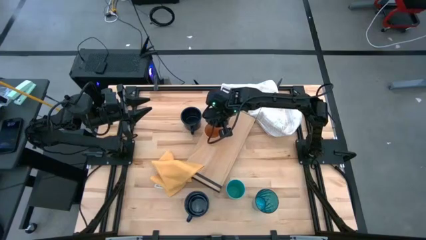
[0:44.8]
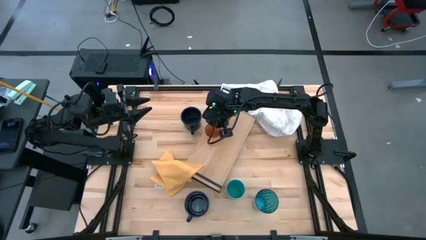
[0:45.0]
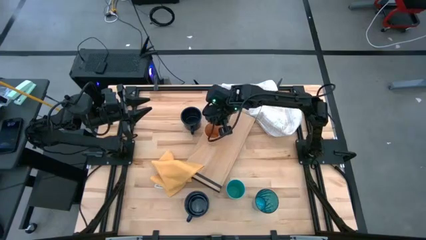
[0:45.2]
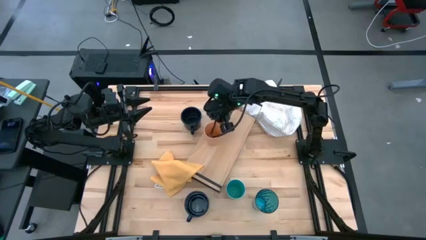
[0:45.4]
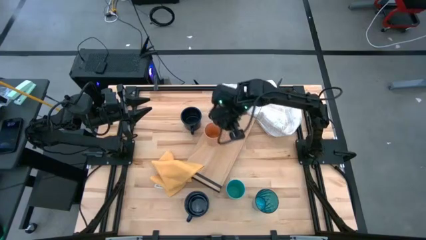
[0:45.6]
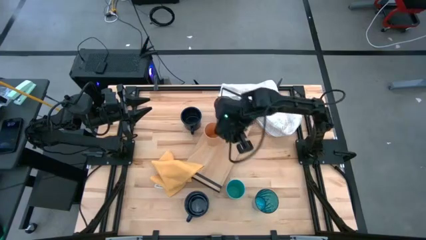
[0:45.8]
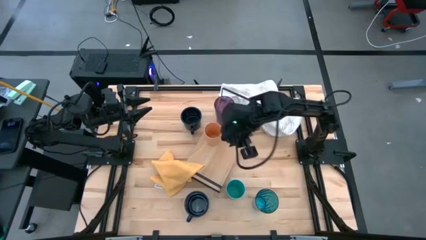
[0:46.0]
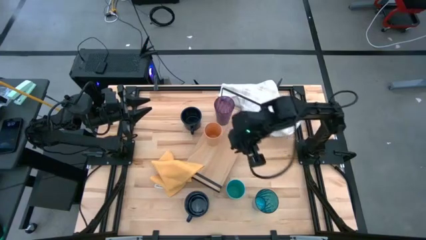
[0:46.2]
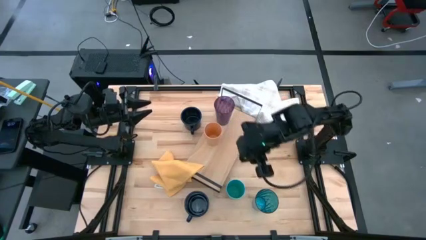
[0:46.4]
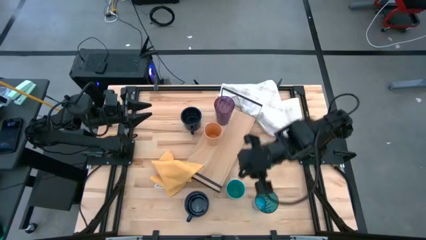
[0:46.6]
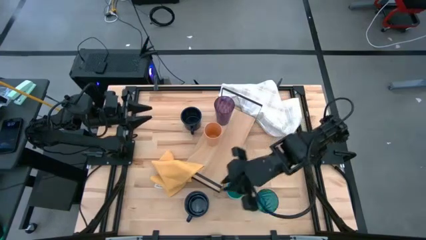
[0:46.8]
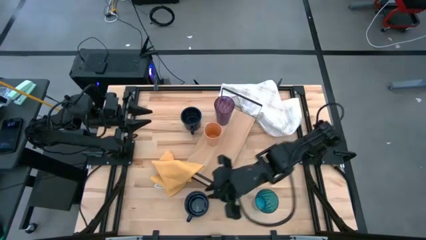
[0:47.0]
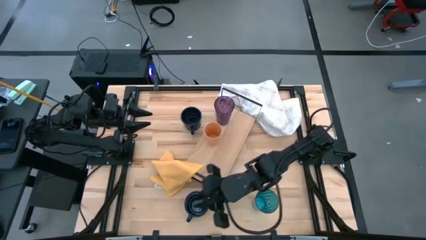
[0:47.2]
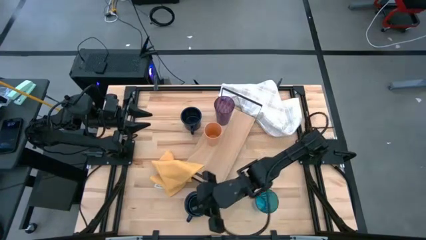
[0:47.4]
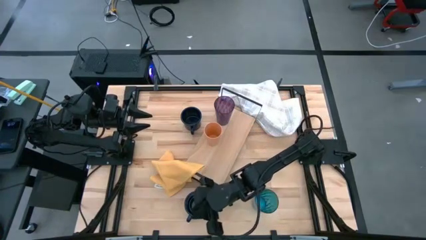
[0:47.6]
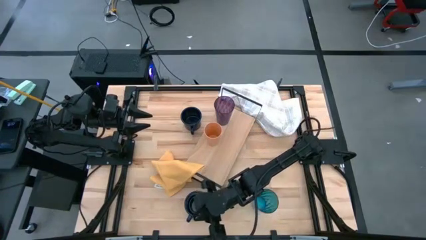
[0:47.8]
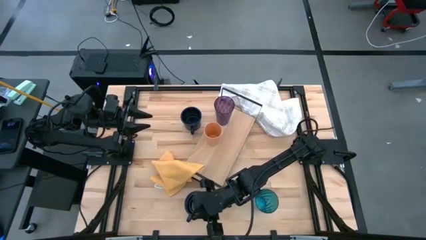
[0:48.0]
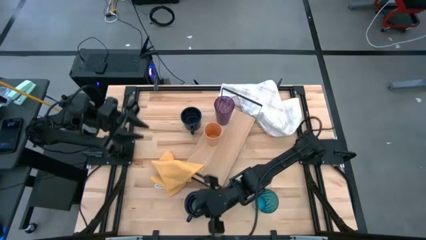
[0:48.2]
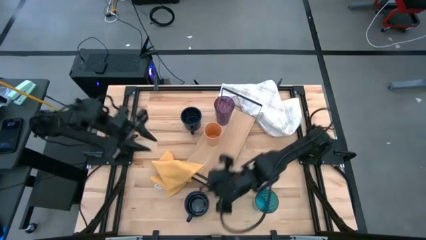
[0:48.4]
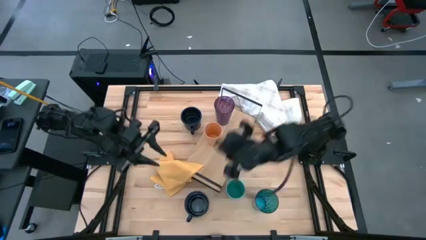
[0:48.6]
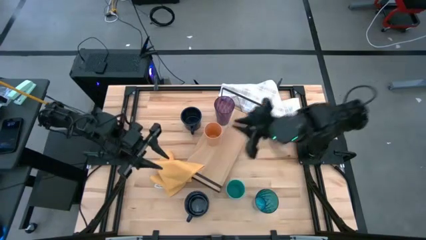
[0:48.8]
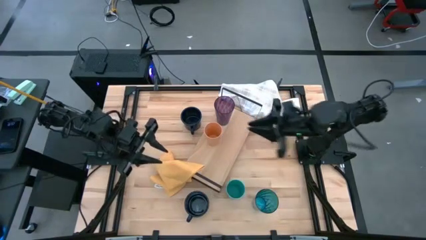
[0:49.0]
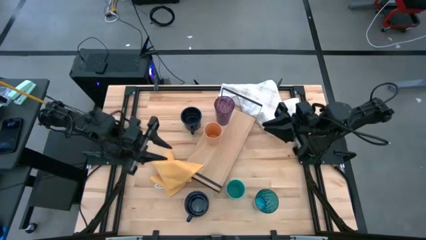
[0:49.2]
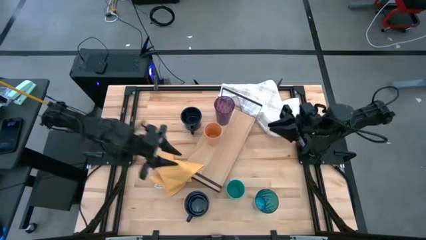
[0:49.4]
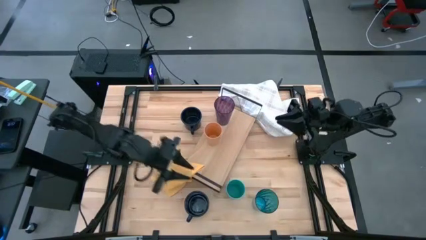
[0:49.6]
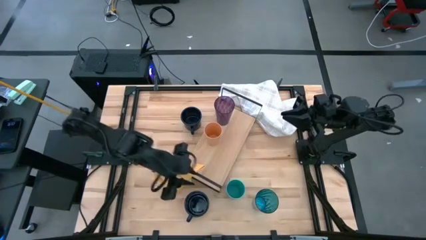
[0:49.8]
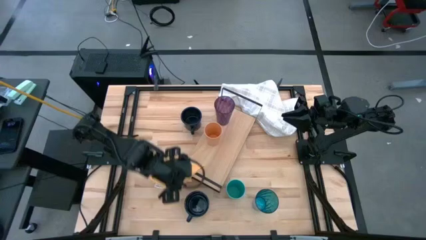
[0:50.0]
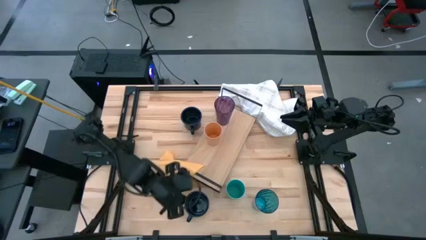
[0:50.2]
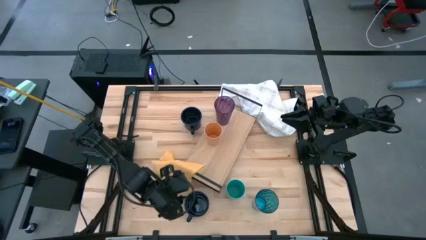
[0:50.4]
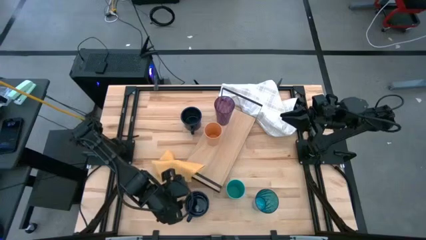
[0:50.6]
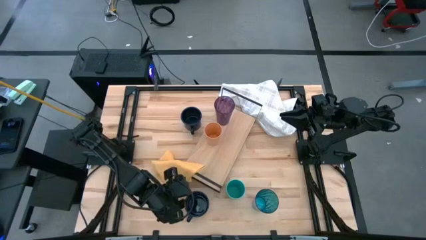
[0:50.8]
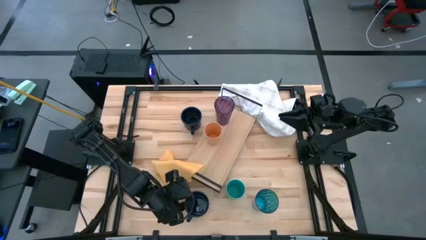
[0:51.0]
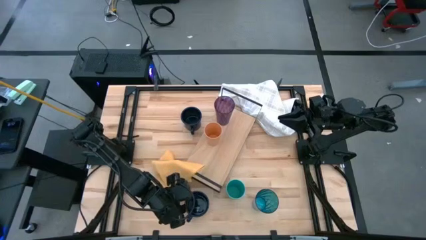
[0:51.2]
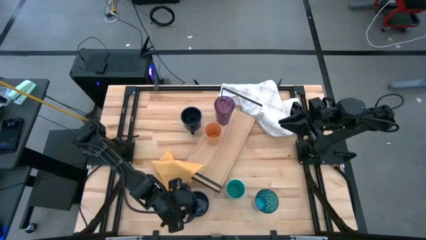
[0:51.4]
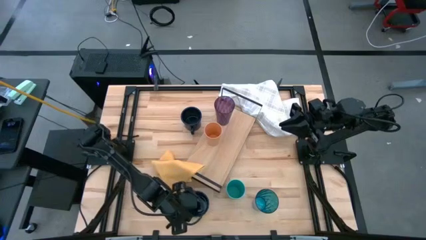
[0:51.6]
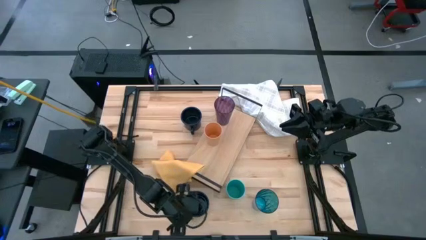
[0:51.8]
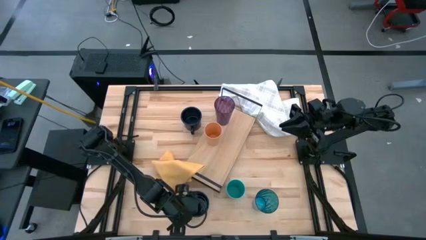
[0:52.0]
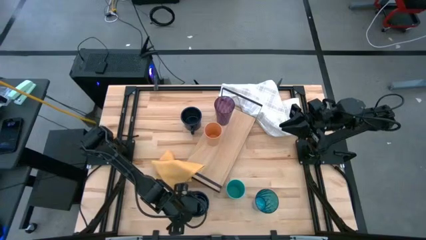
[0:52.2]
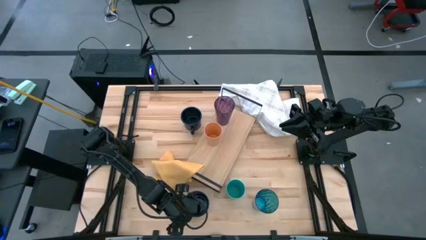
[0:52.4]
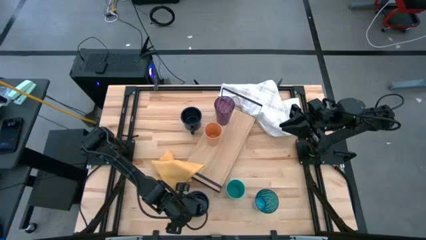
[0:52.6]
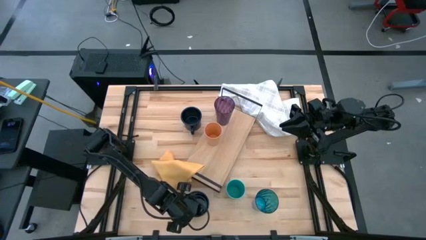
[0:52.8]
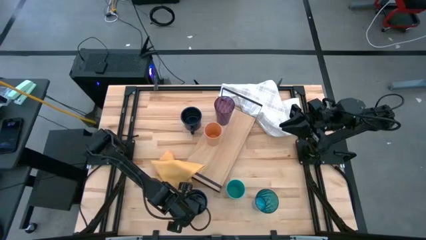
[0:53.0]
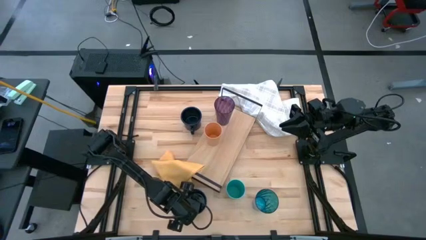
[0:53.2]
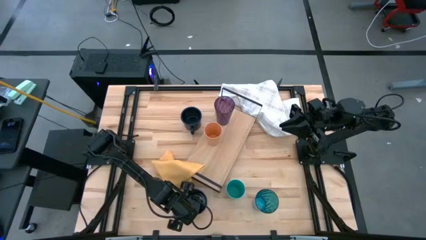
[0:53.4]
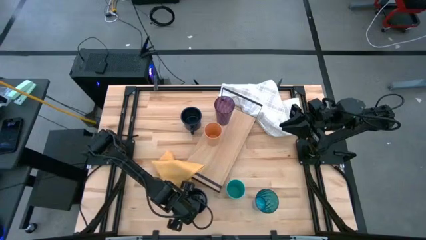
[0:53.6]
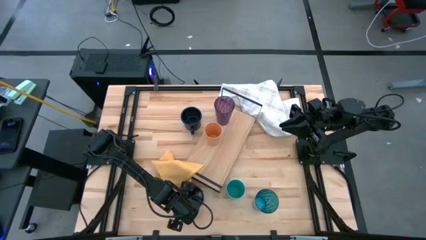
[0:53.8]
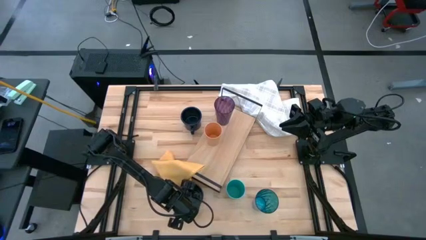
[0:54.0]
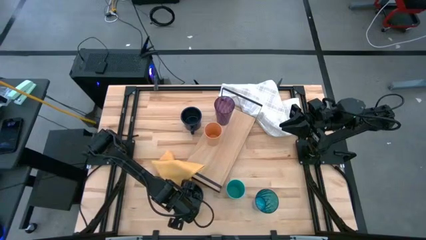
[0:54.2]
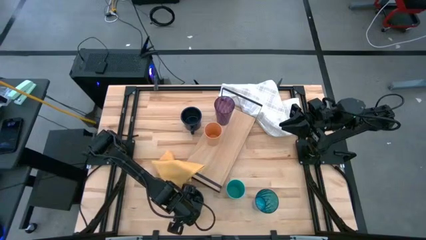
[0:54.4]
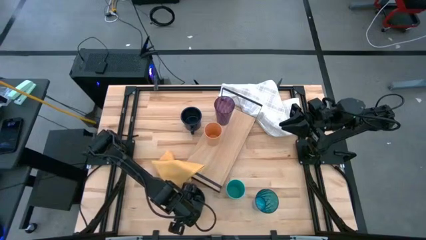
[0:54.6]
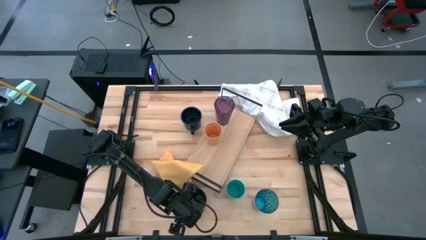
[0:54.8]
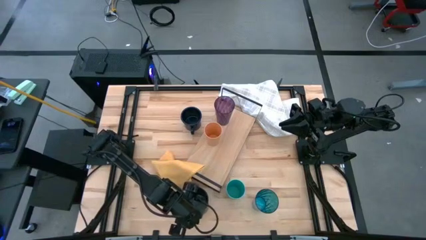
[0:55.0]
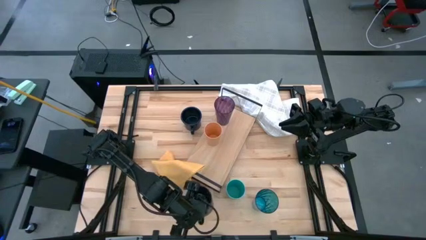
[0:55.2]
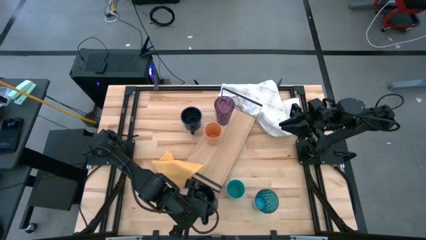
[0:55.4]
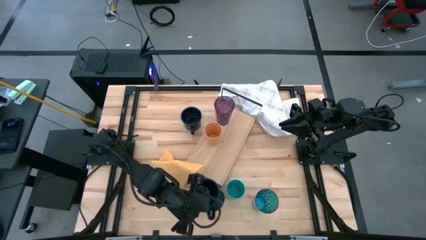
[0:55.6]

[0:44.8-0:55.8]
Task: Stack small to large cups/mugs on shelf
Put the bottom dark blue mug on the shelf
